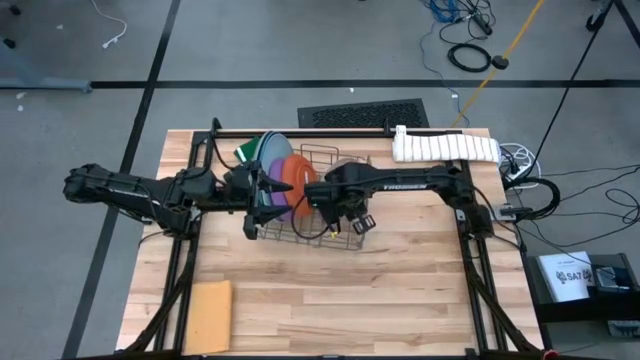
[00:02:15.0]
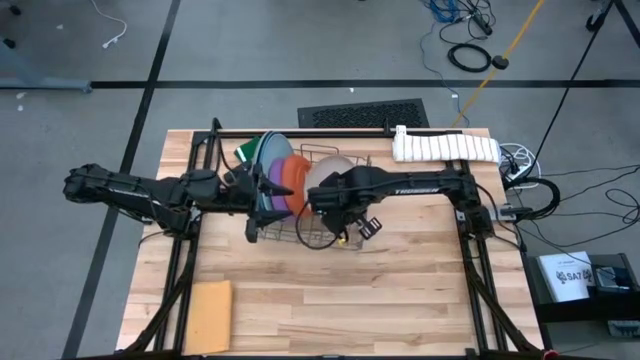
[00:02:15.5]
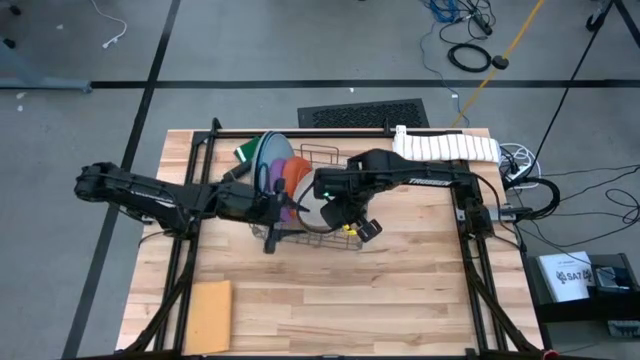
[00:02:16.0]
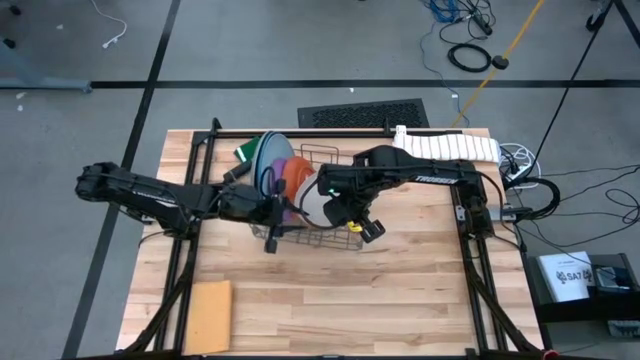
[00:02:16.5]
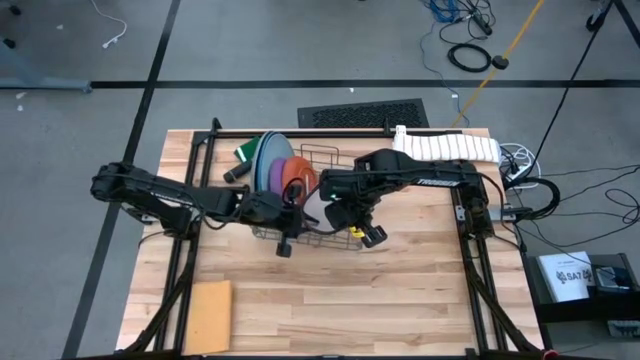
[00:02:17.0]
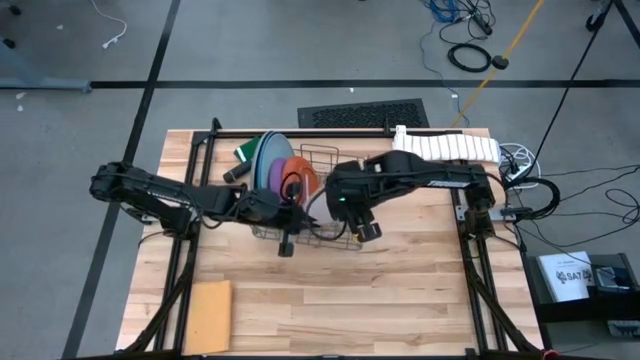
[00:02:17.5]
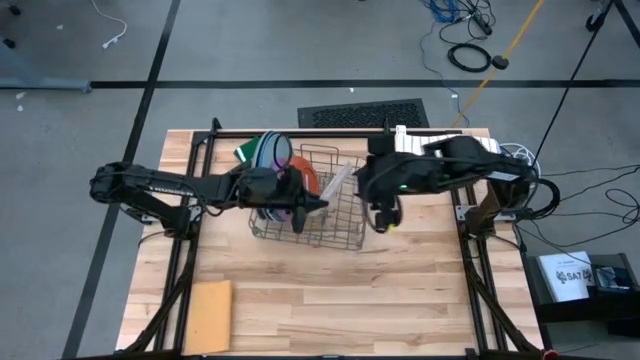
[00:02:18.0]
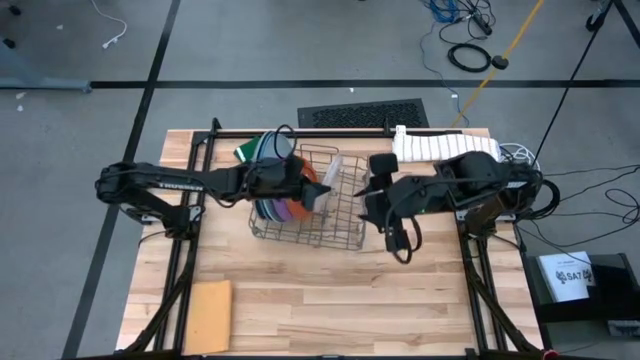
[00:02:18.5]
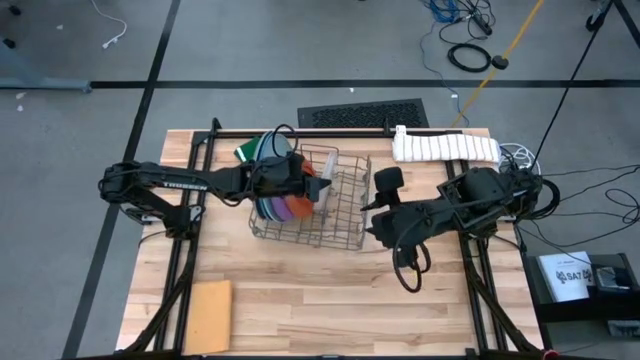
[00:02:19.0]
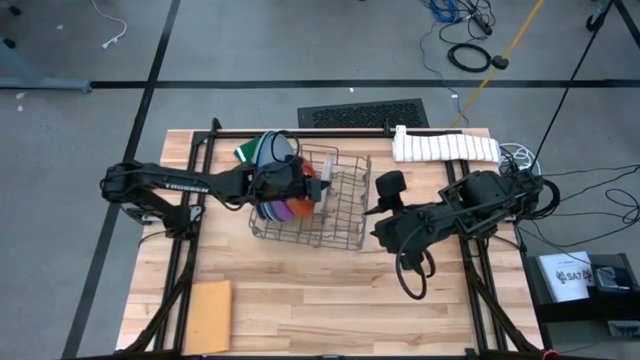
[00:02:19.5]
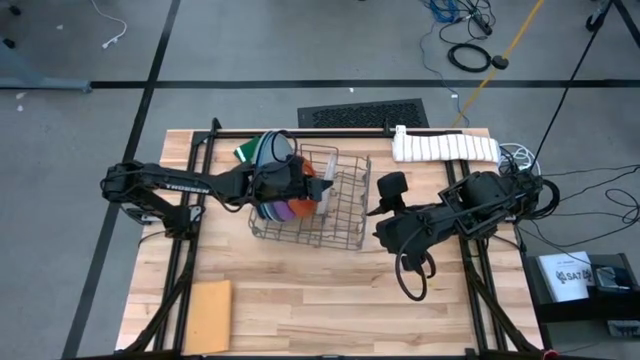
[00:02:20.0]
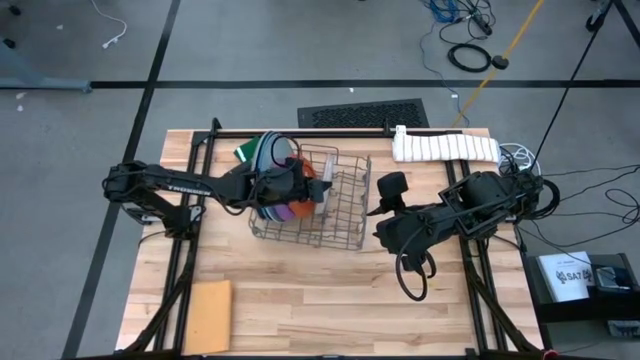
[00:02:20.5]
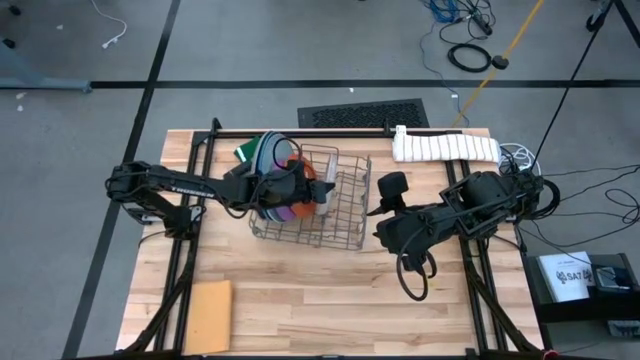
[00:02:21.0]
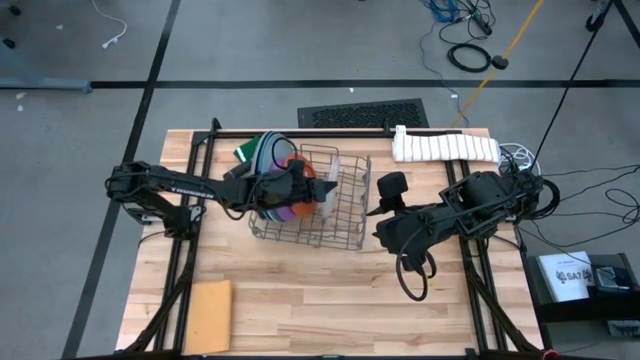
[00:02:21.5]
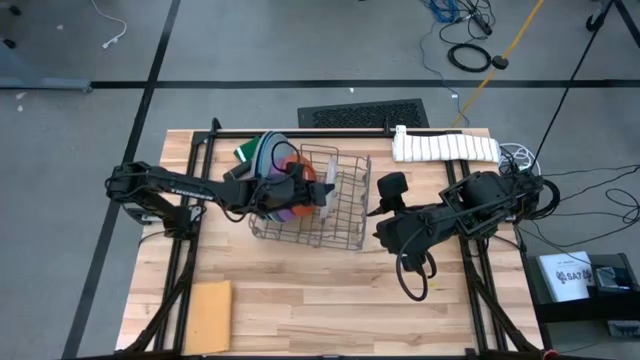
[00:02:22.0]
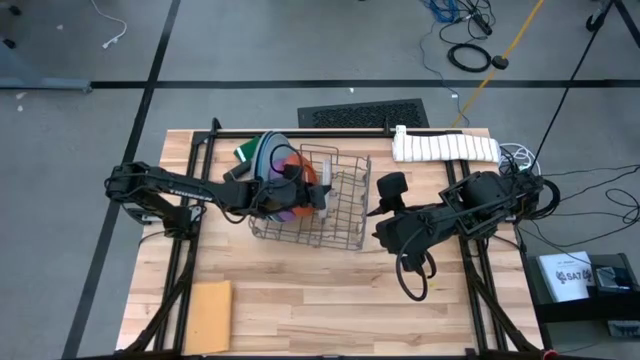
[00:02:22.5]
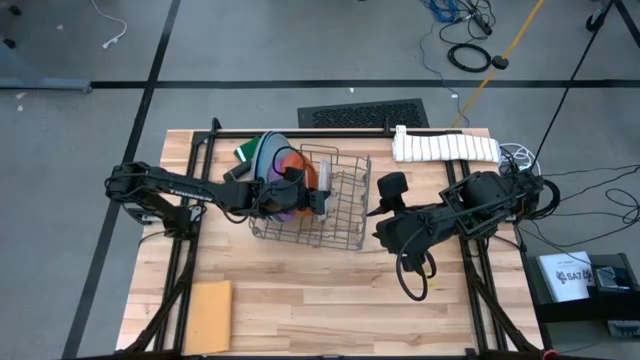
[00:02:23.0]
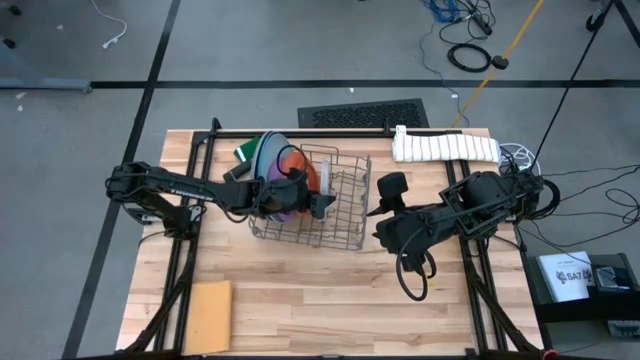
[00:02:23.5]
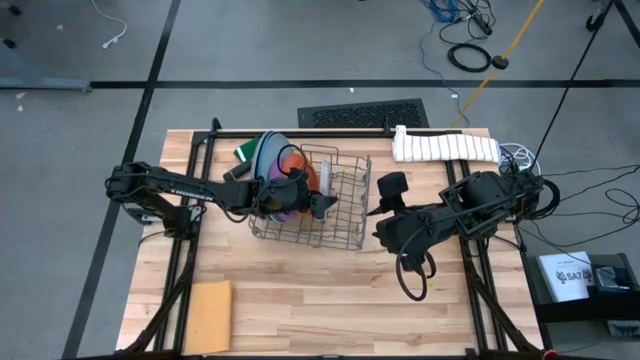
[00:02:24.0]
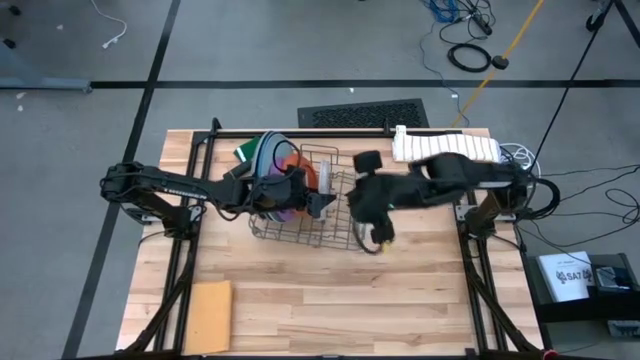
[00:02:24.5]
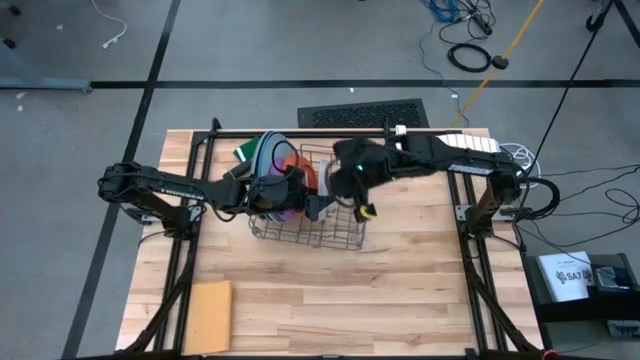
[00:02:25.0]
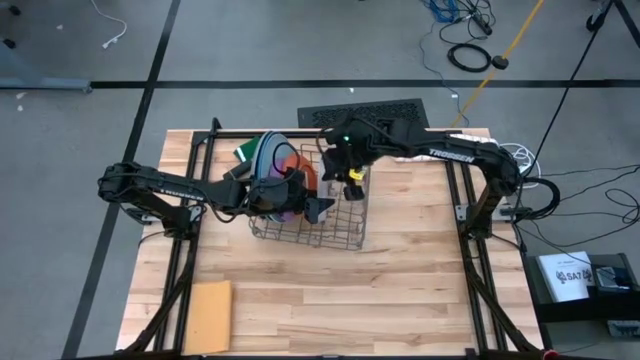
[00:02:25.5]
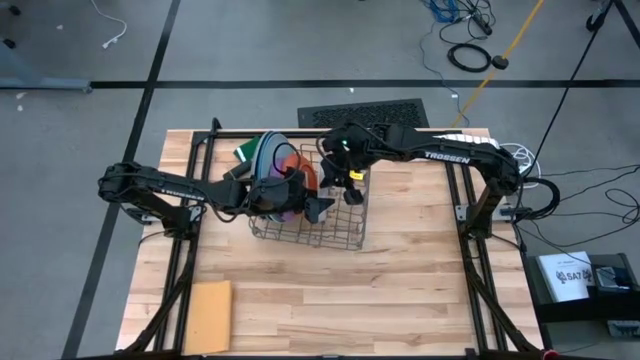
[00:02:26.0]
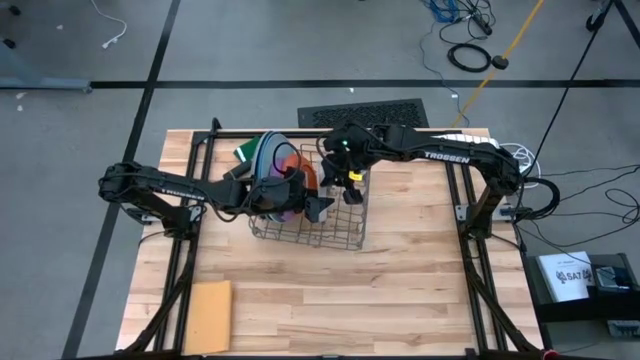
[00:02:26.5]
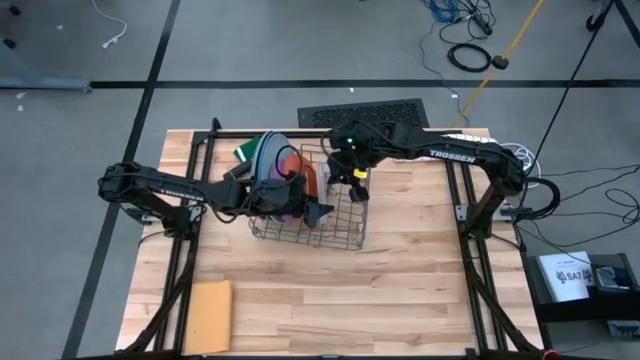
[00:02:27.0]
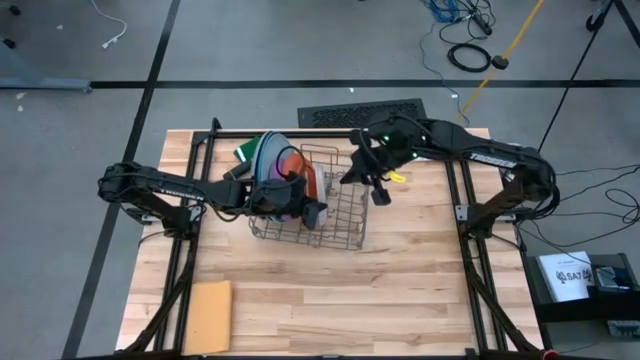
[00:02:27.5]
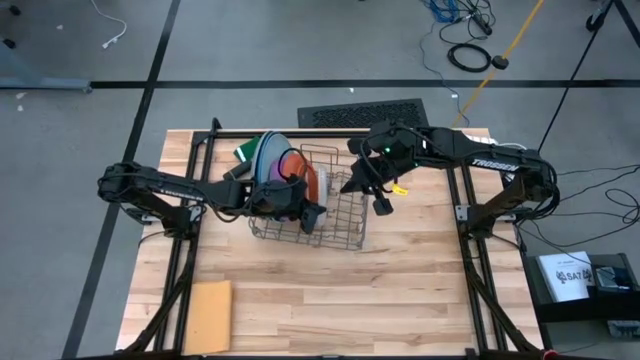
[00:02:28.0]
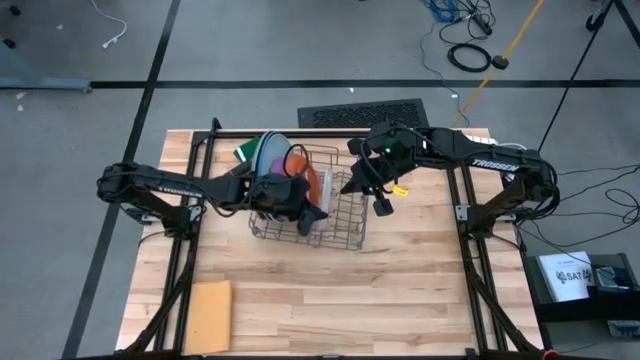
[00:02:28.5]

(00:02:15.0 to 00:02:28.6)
Task: Sort dishes
Put the white plate into the green dish rack

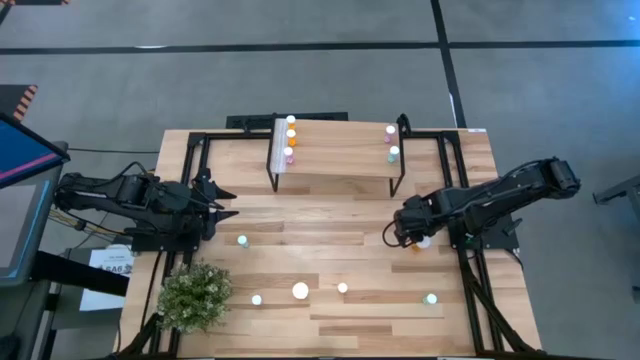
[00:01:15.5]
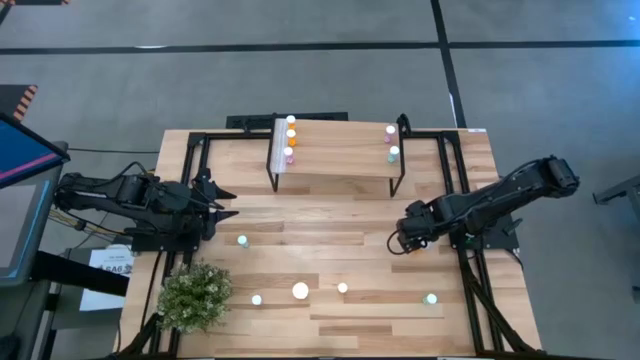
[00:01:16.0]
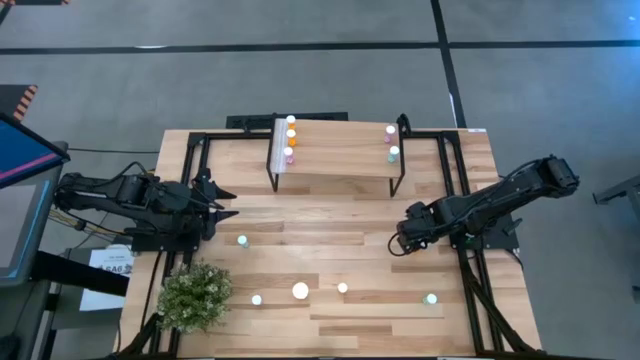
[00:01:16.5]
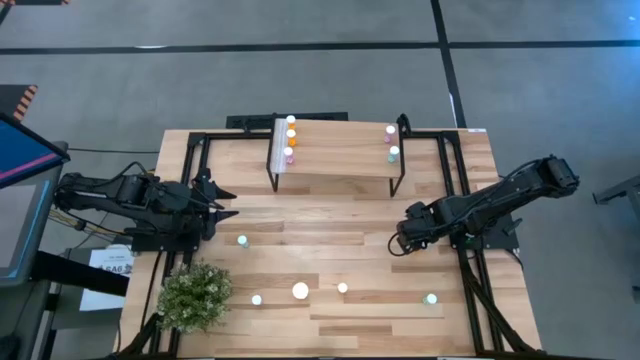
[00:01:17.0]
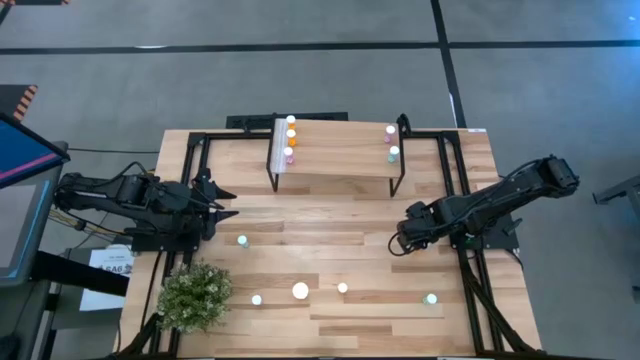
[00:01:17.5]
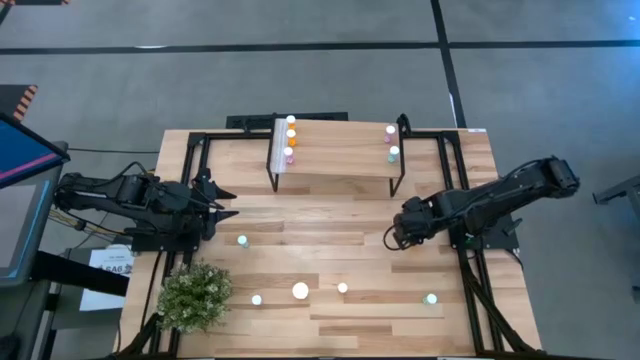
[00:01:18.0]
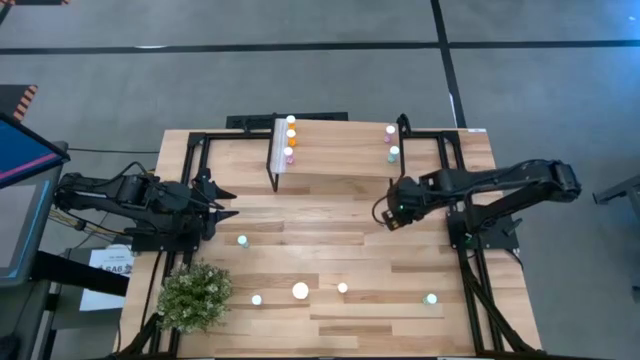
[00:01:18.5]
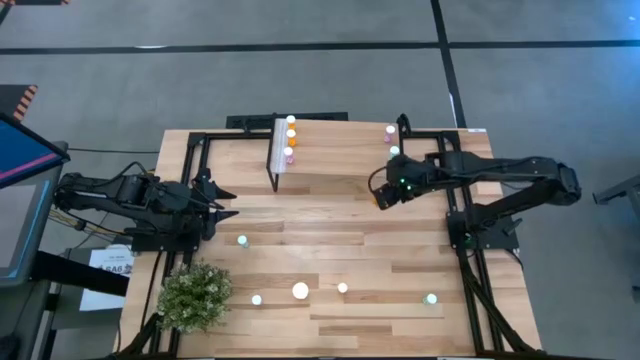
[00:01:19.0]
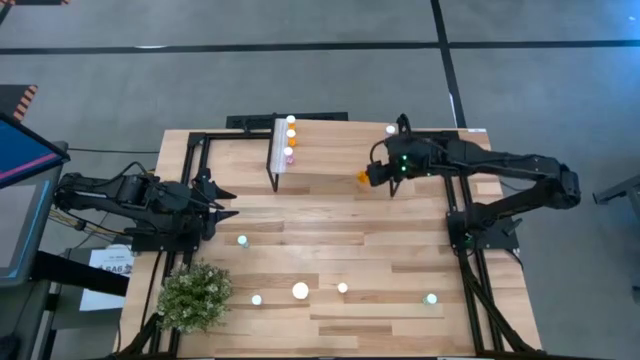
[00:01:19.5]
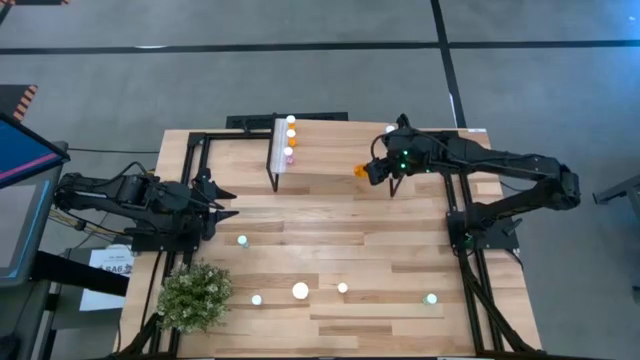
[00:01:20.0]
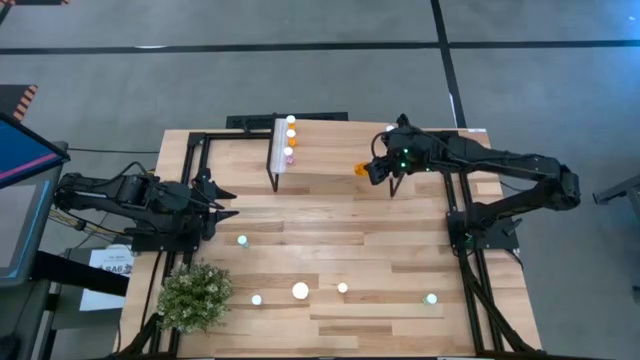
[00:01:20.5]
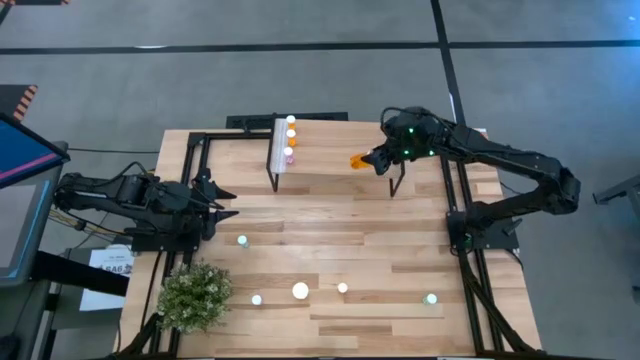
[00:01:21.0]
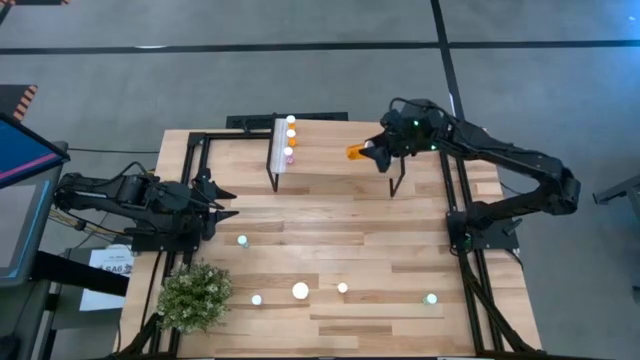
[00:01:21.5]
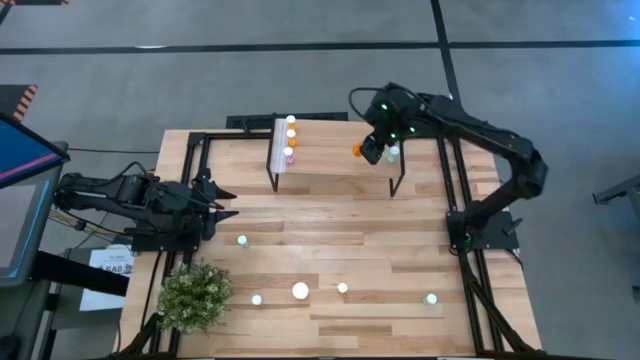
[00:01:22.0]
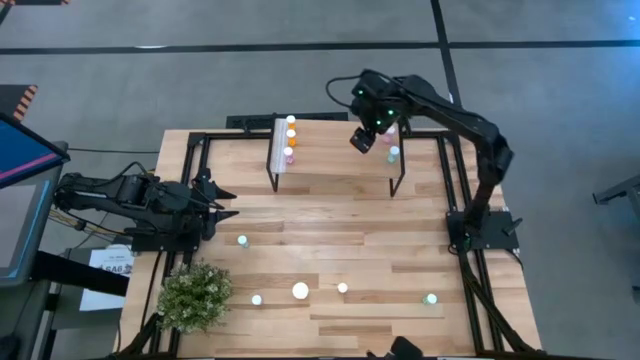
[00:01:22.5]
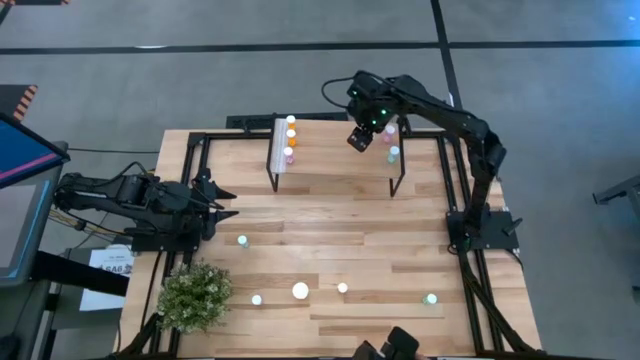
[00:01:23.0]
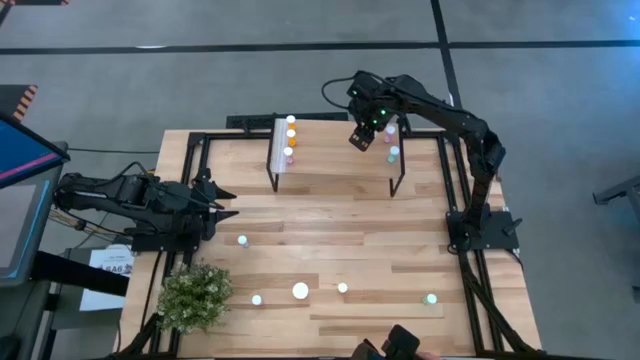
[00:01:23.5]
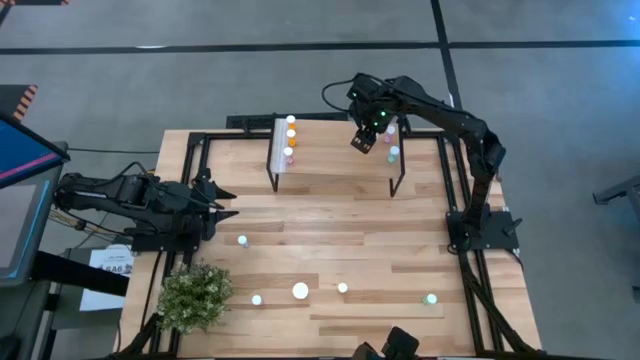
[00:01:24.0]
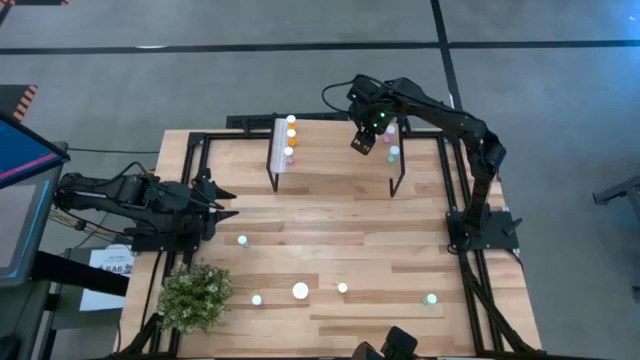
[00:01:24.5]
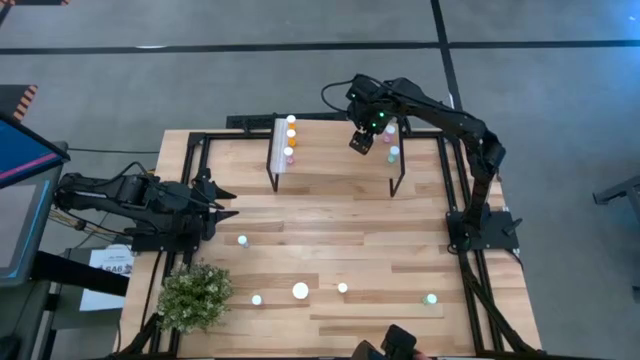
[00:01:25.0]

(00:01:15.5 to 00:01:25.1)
Task: Pick and place medicine bottles onto shelf by color
Put the top large orange pill bottle on the shelf
